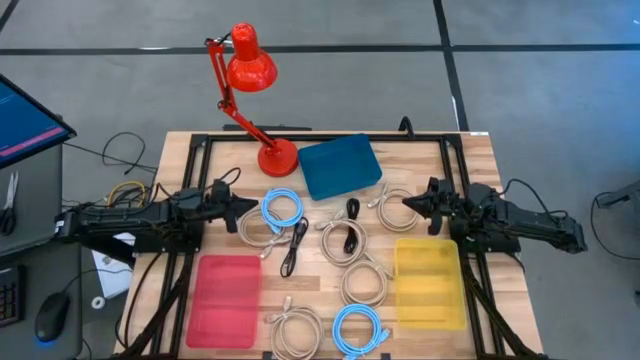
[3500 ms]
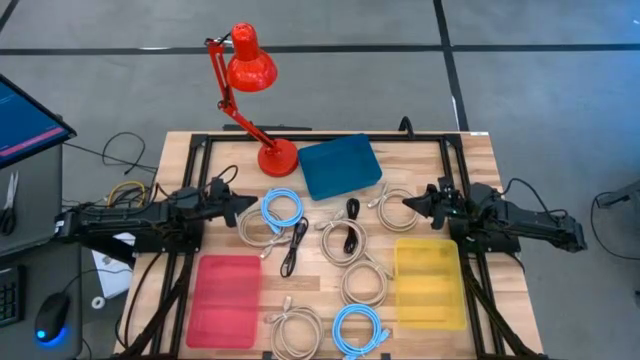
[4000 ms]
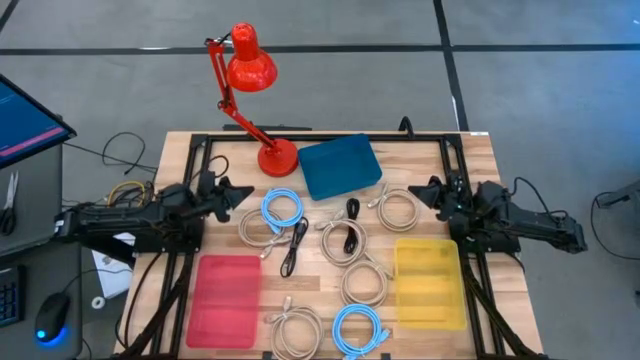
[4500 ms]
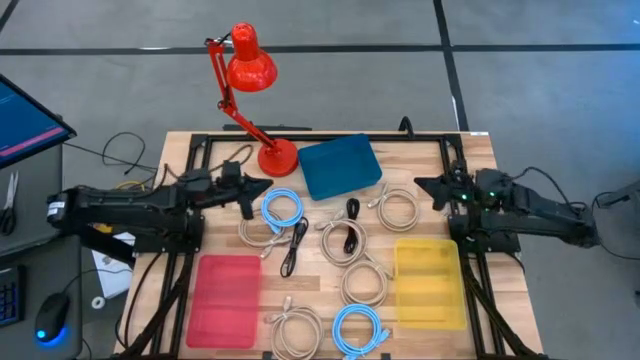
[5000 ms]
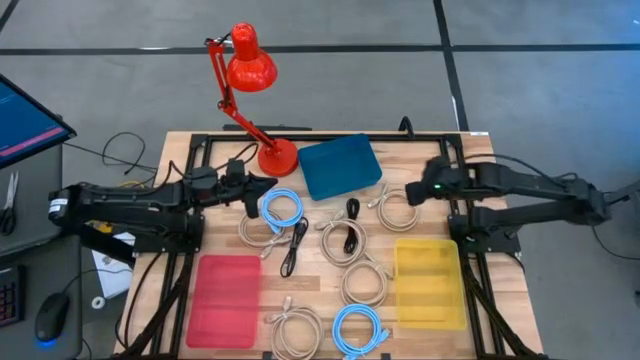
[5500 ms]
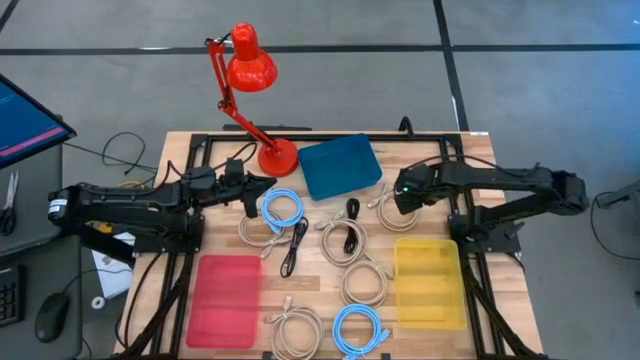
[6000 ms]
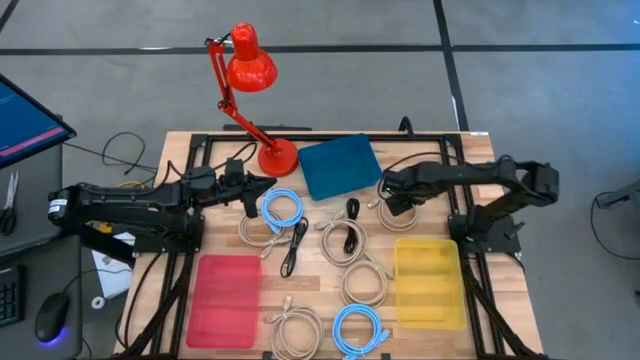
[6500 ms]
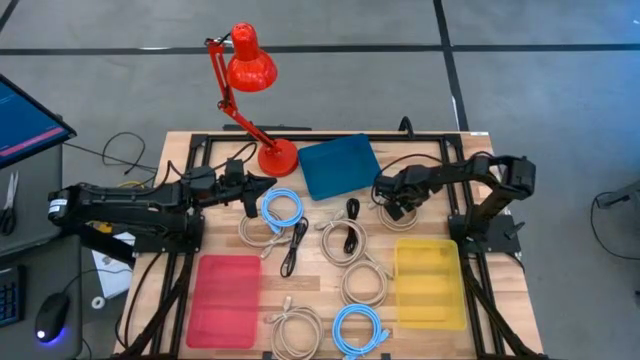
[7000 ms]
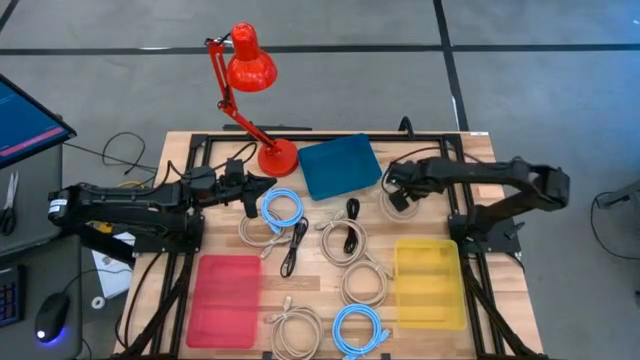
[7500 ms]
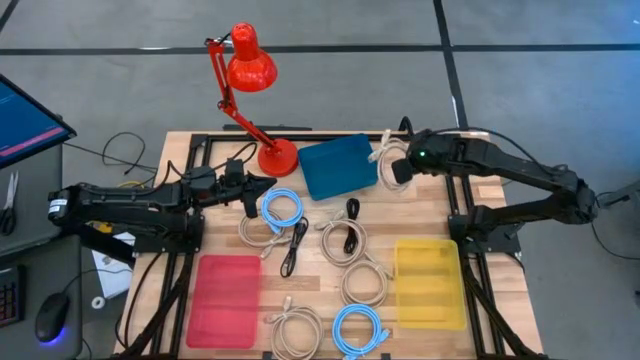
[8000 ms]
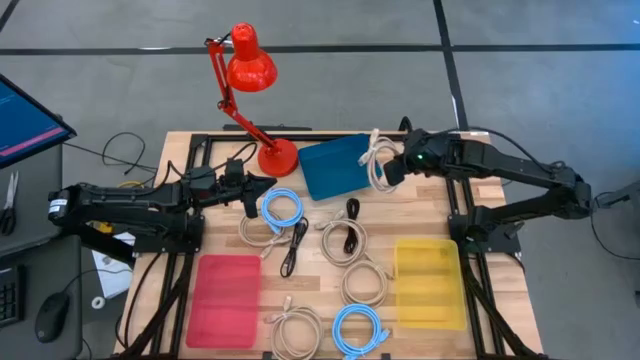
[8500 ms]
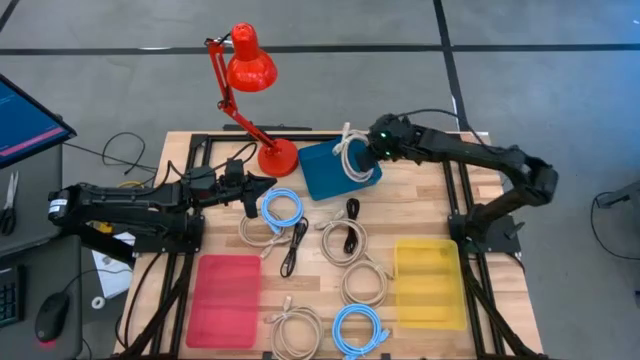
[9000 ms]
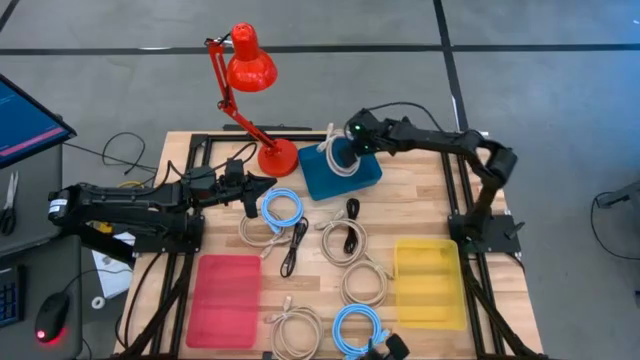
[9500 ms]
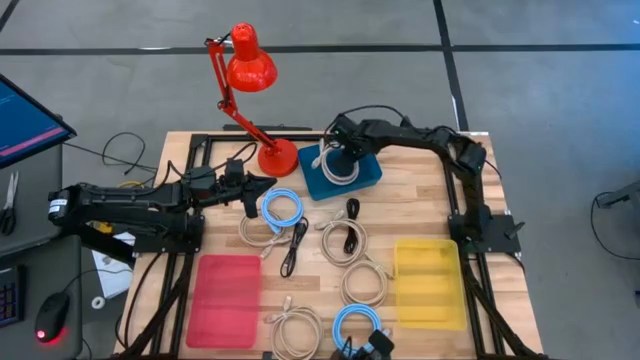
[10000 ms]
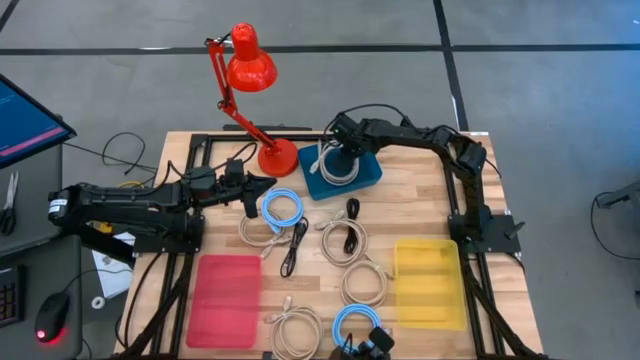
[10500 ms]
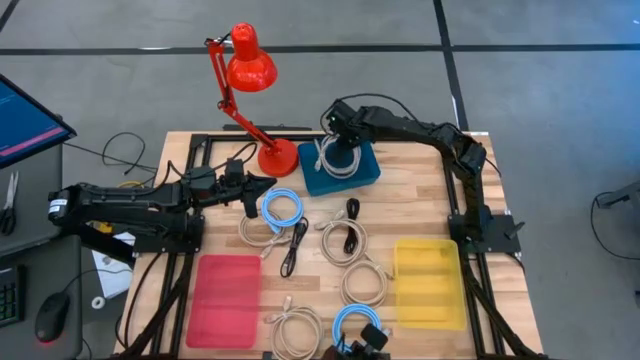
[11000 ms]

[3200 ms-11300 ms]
Task: Sort HDMI cables
Put the brown HDMI cable into the blue bin

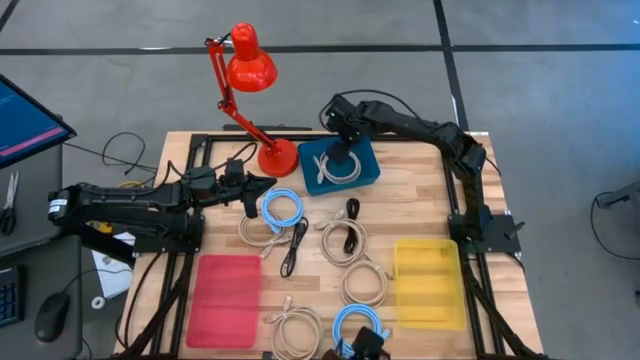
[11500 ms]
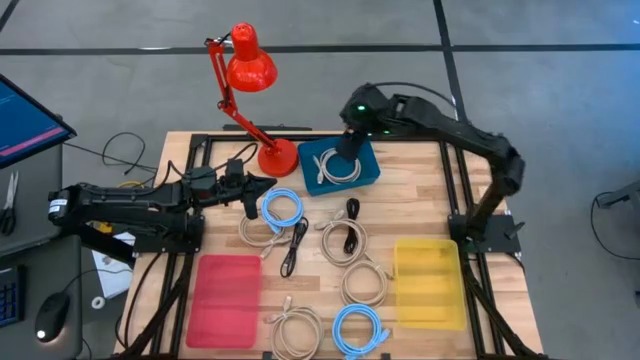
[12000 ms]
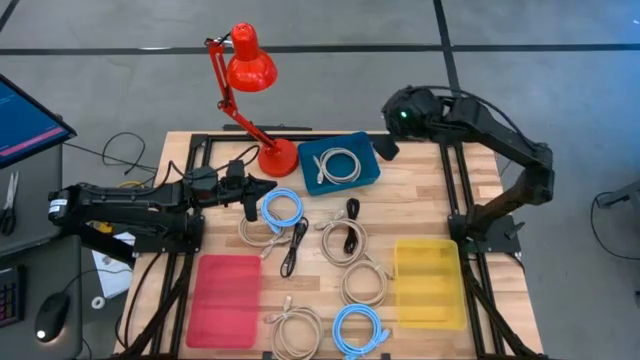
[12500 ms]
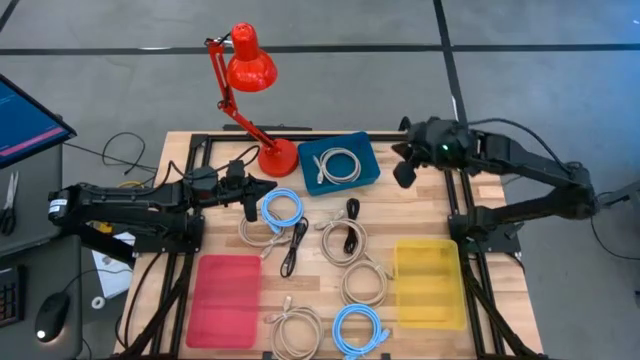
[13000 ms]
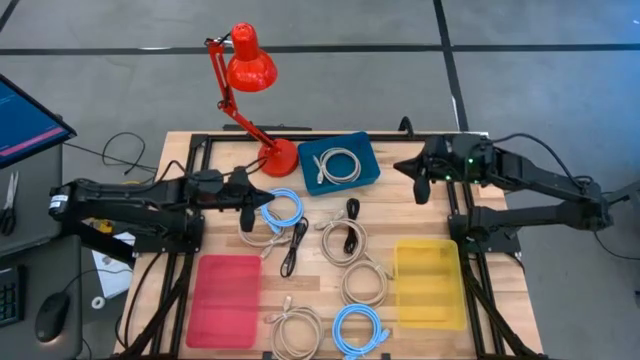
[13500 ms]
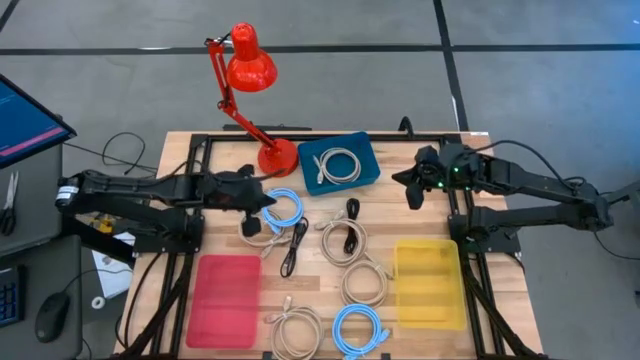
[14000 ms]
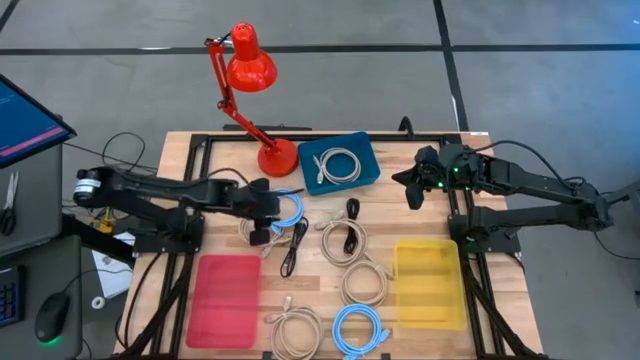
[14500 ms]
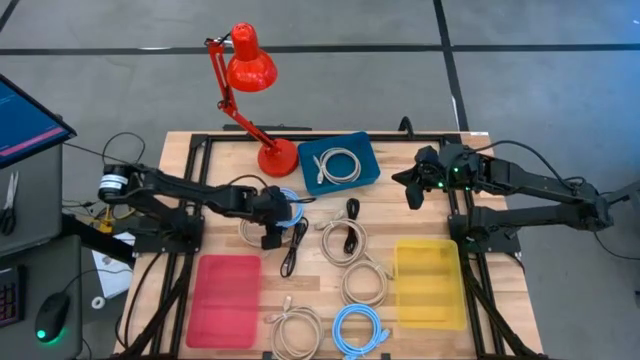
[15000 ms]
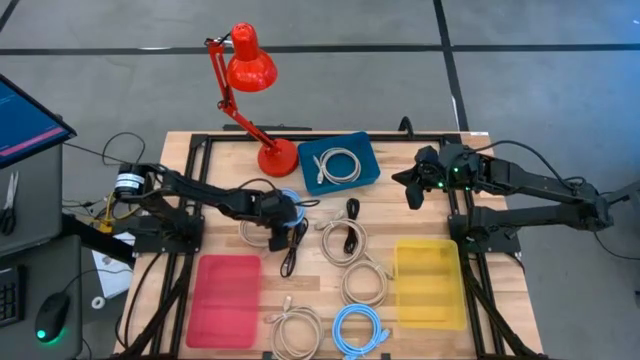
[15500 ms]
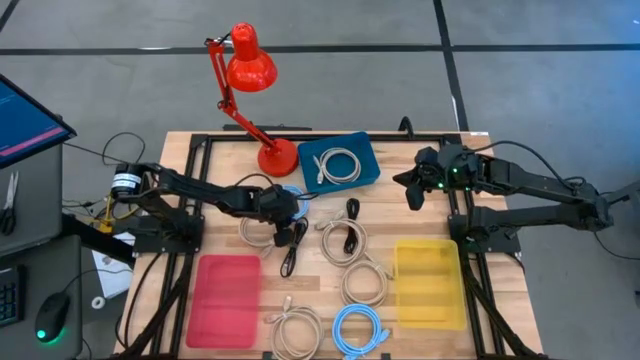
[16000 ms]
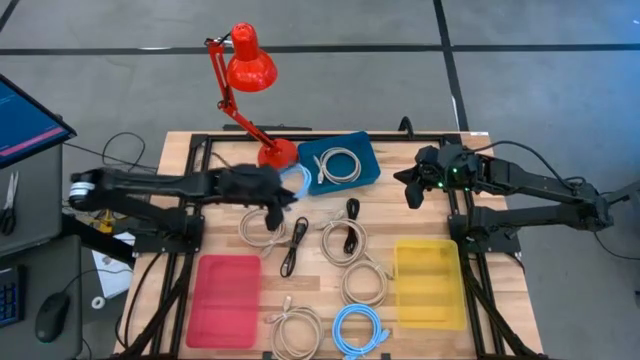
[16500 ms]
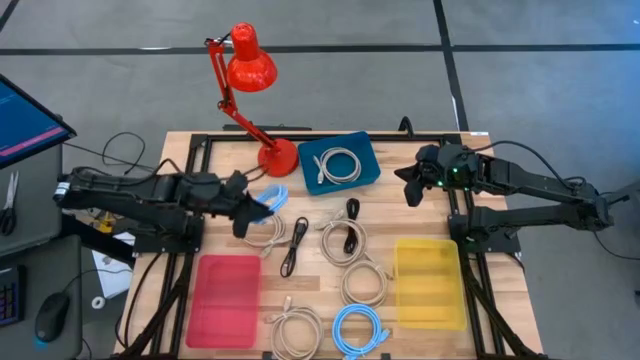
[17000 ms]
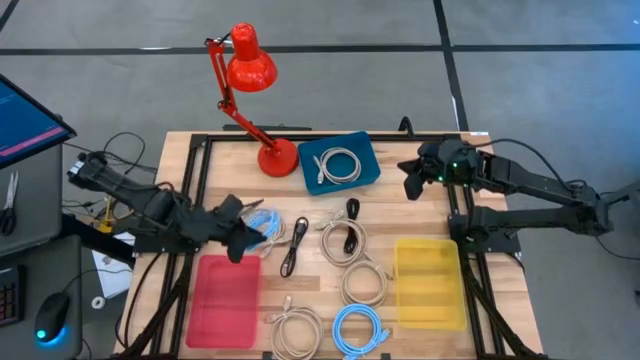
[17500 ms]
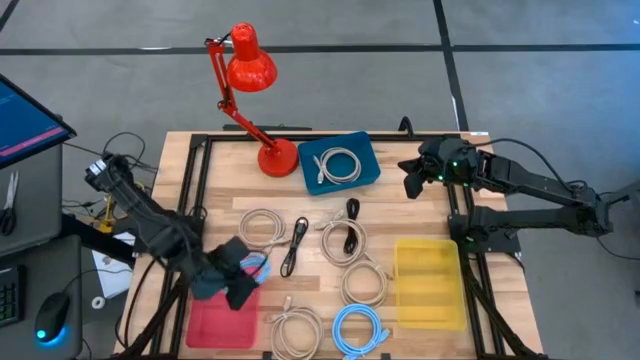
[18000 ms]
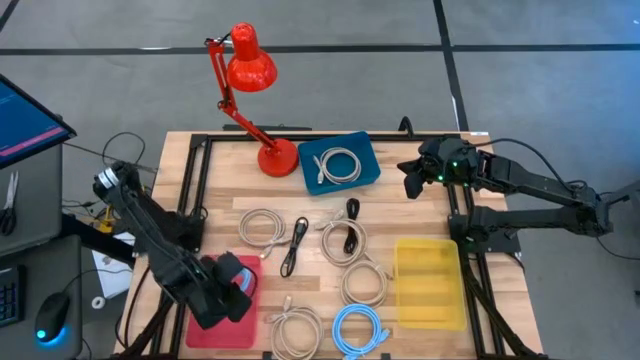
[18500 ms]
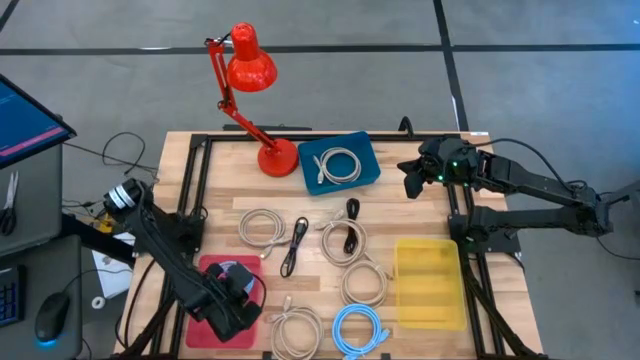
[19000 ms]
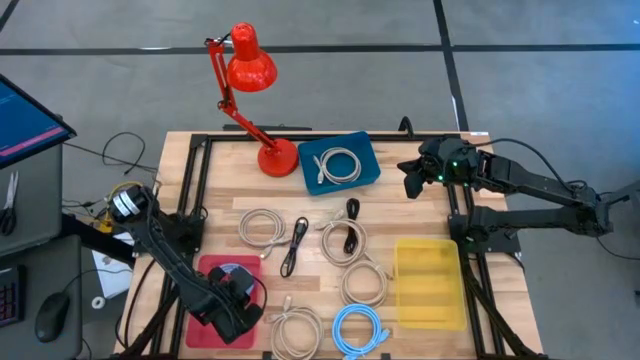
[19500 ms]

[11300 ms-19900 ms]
Put the blue HDMI cable into the red bin

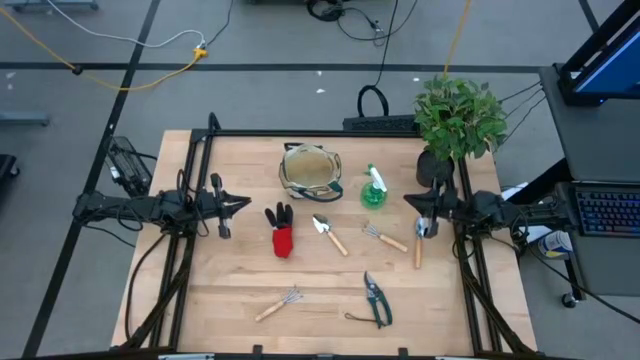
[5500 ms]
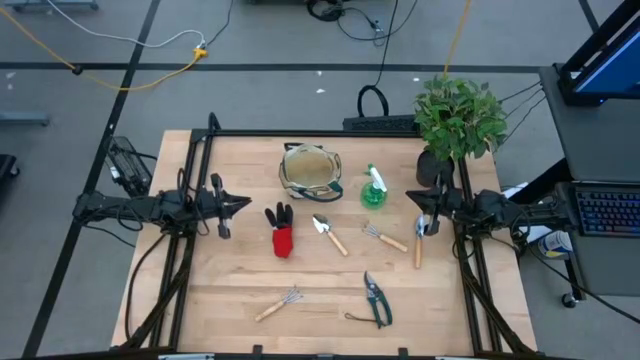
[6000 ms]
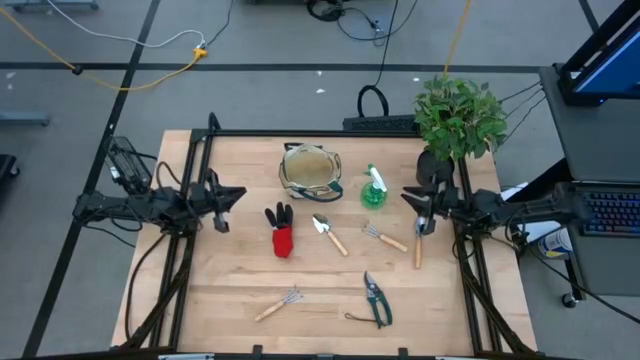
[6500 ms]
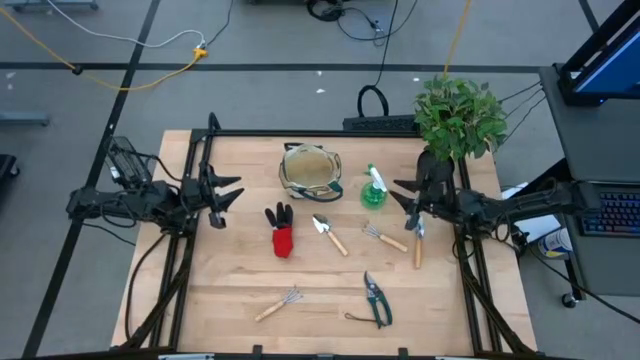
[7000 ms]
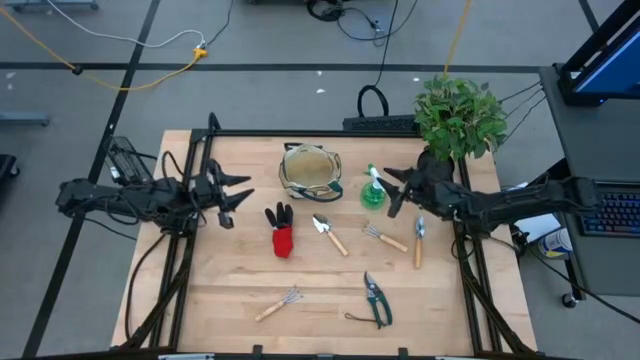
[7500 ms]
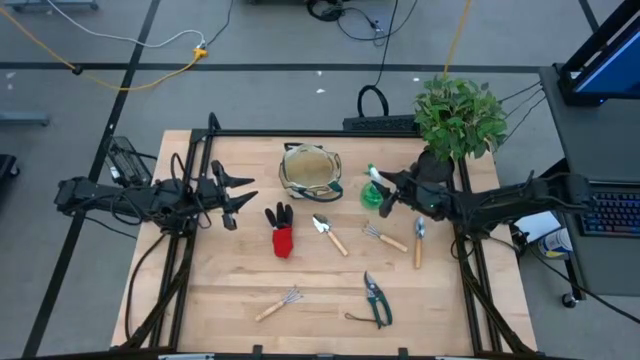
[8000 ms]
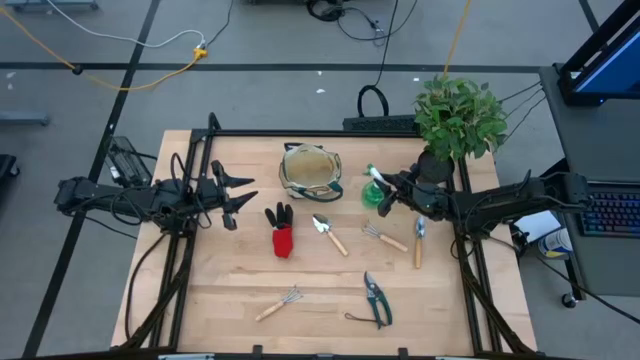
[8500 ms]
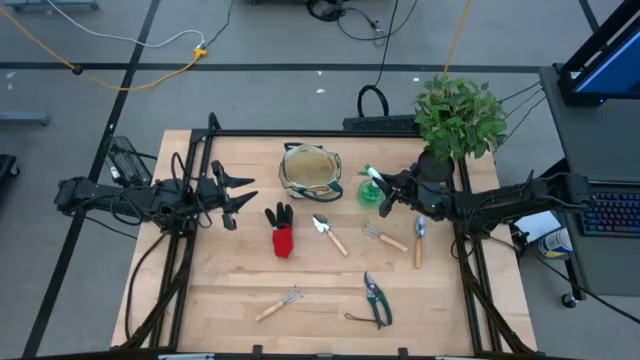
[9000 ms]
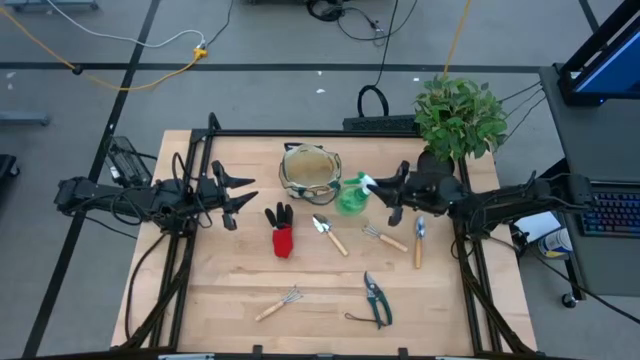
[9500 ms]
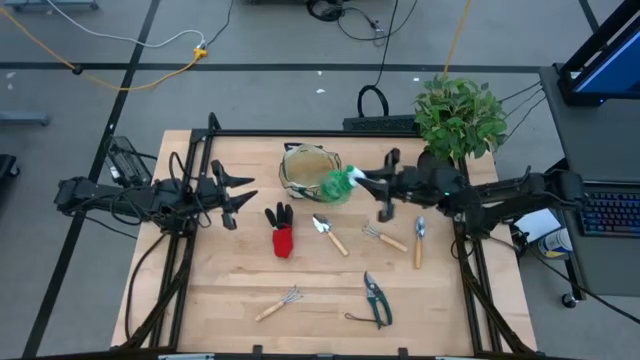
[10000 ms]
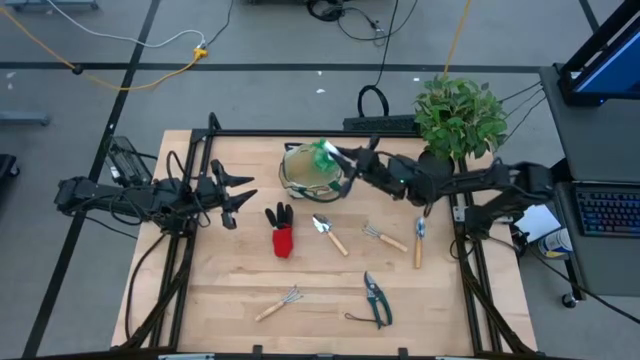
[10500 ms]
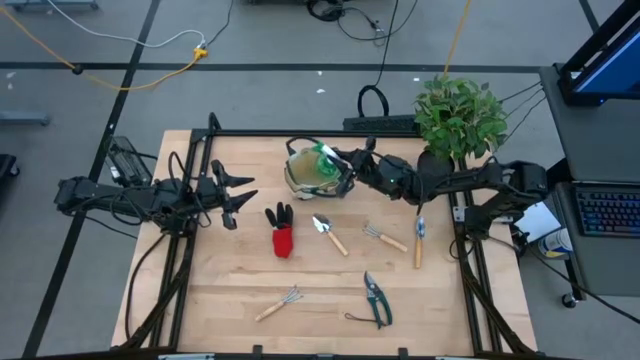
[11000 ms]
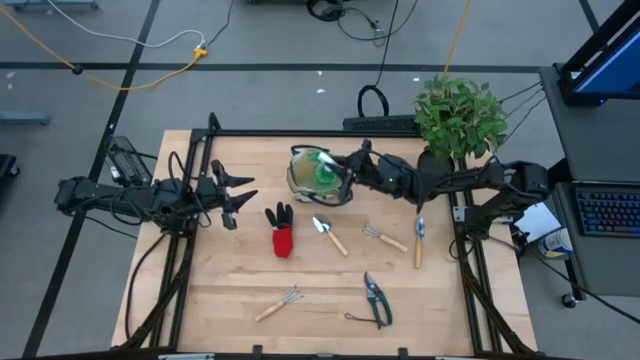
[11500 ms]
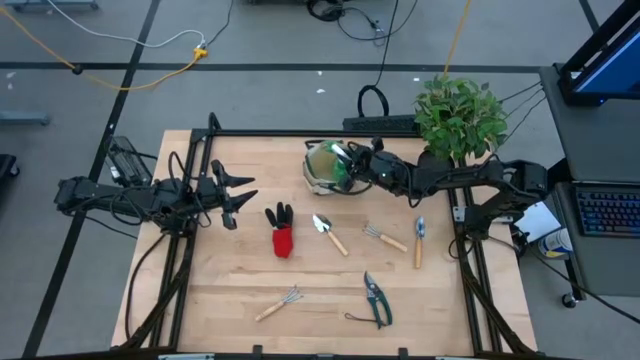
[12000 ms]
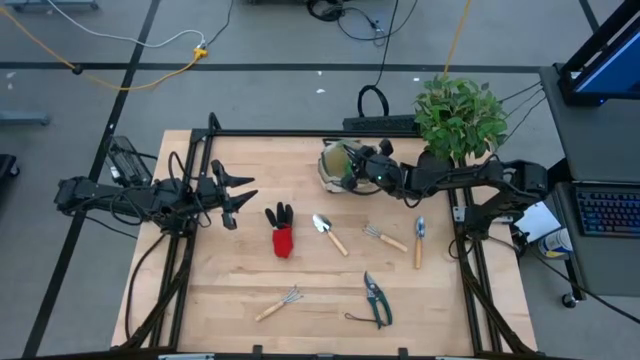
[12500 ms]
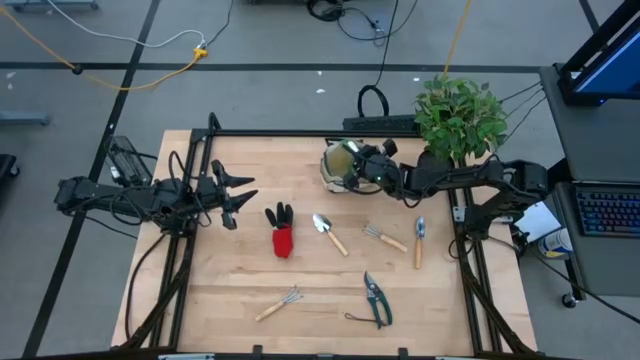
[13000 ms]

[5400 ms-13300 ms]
Task: Pick & Place Garden tools in Gardening bag
Put the green spray bottle into the green gardening bag
